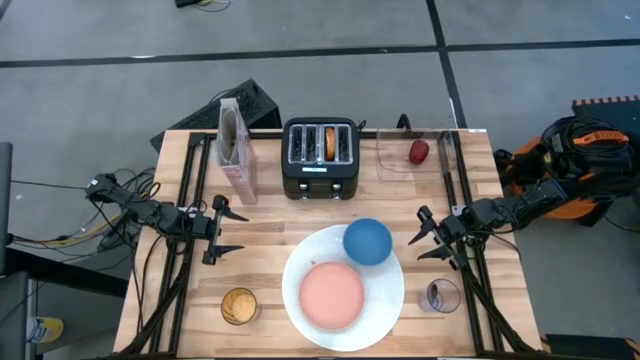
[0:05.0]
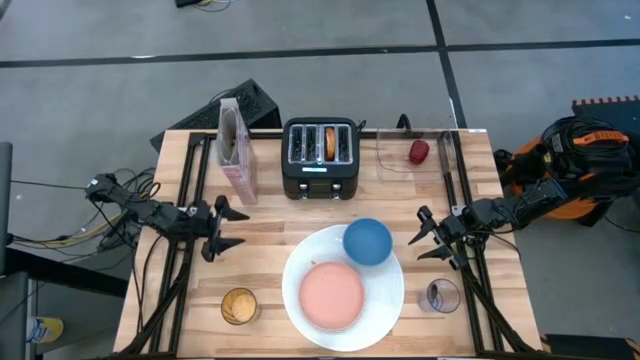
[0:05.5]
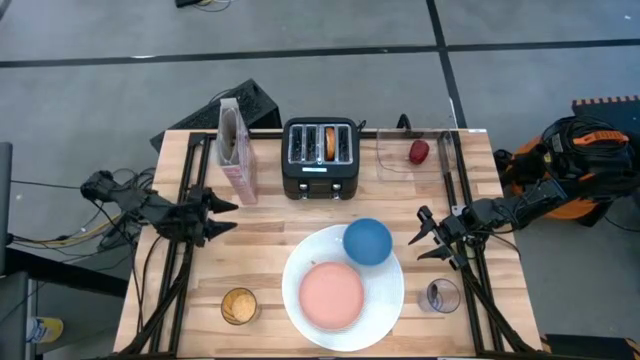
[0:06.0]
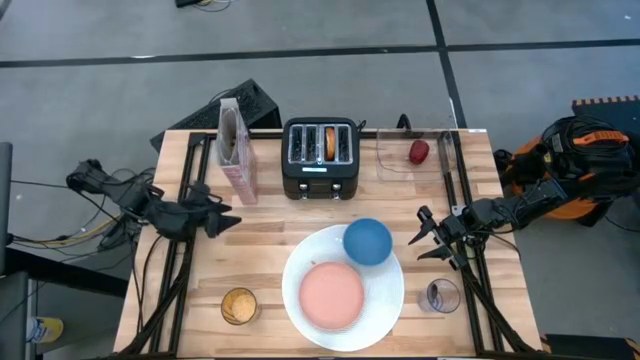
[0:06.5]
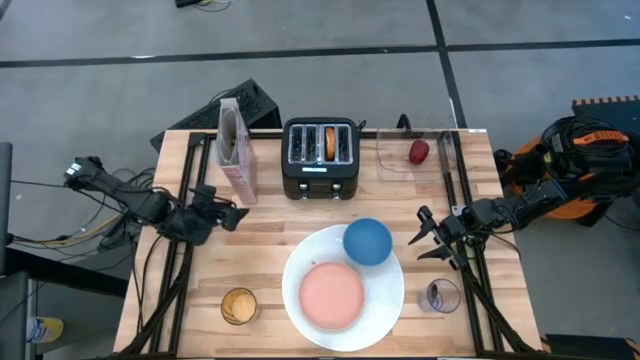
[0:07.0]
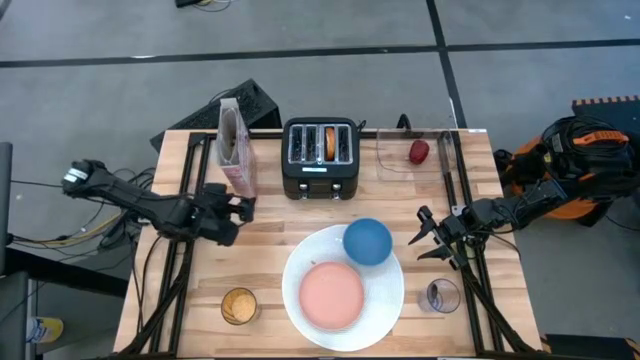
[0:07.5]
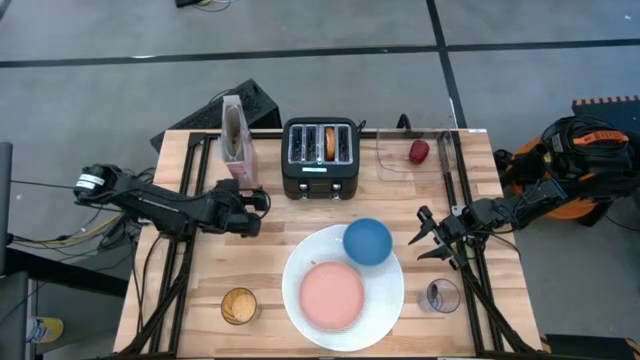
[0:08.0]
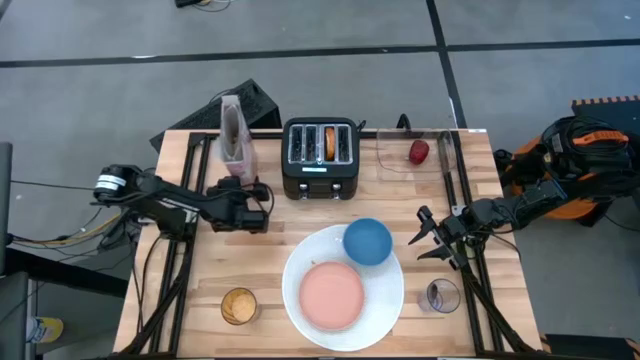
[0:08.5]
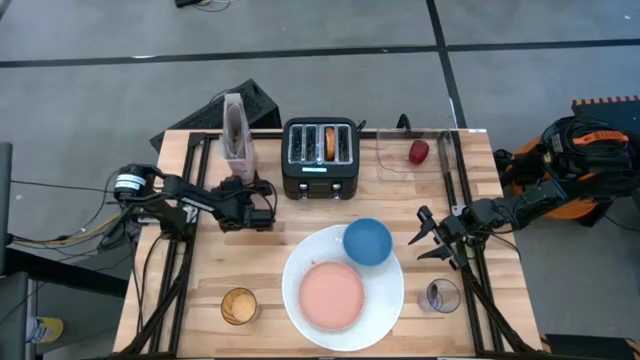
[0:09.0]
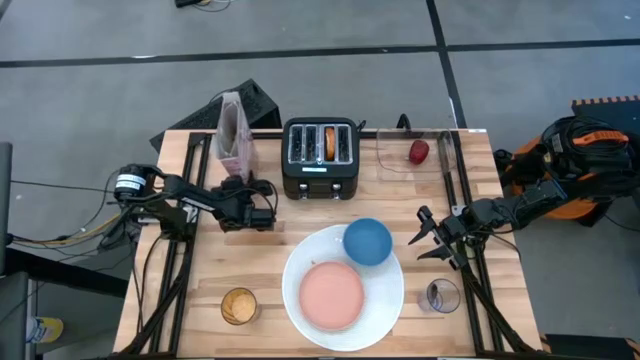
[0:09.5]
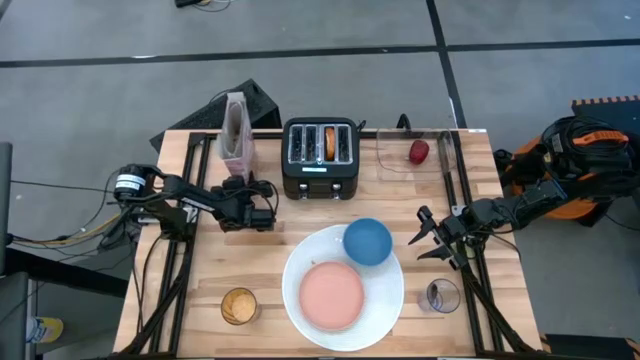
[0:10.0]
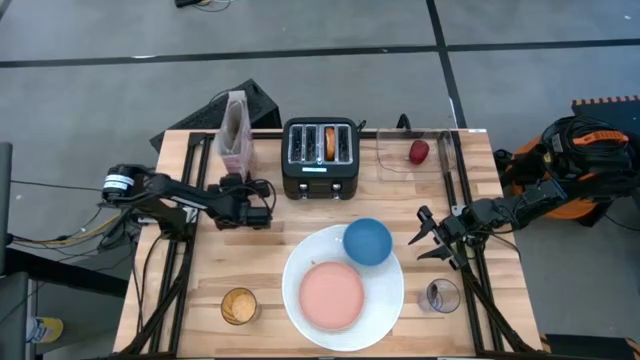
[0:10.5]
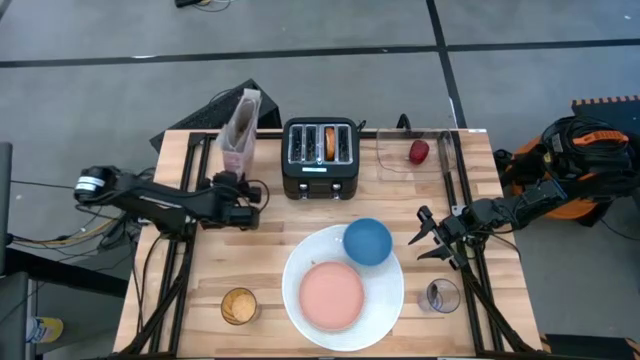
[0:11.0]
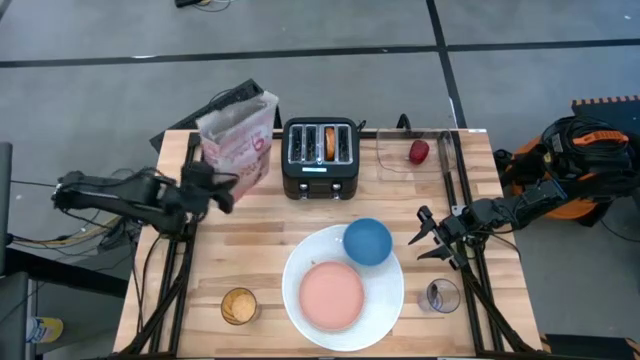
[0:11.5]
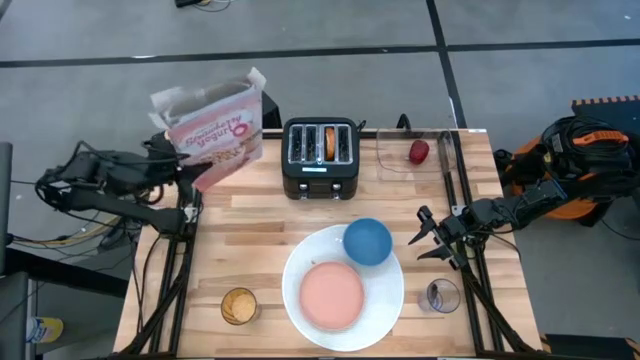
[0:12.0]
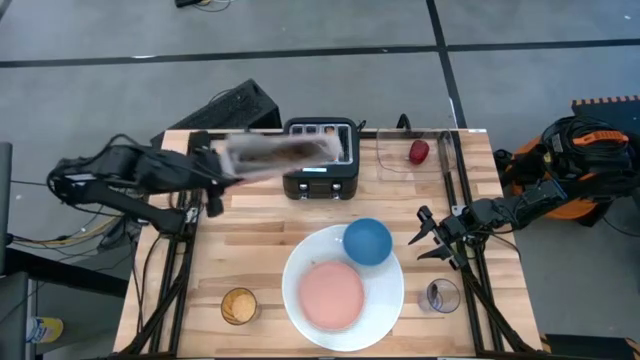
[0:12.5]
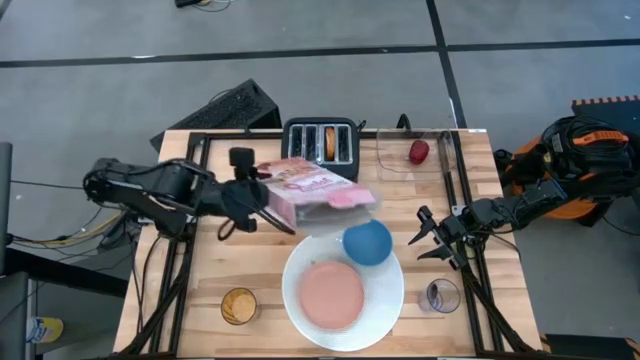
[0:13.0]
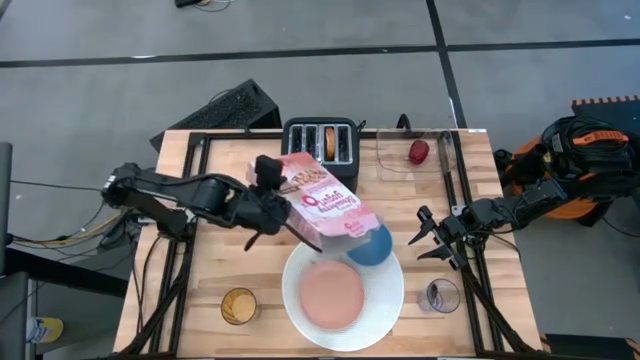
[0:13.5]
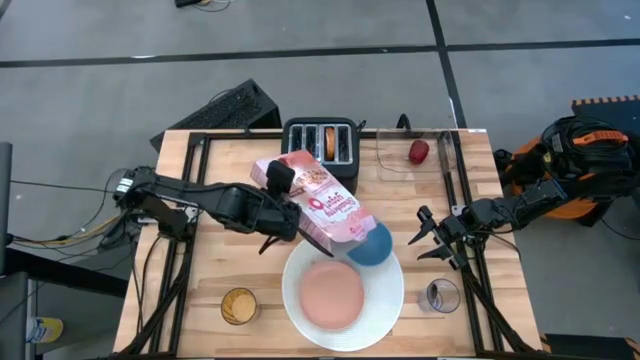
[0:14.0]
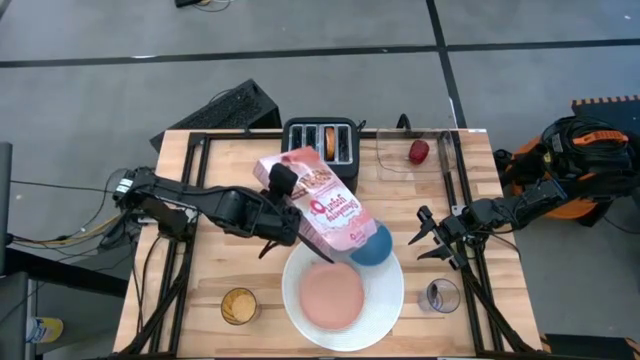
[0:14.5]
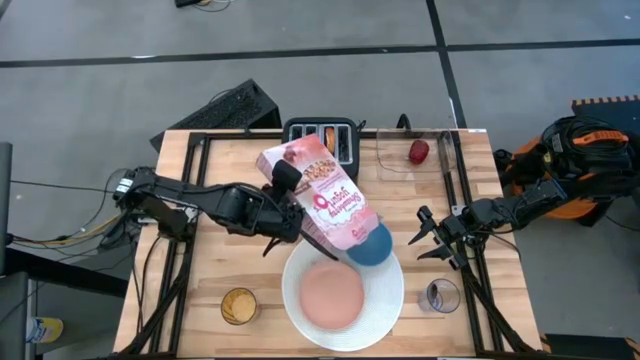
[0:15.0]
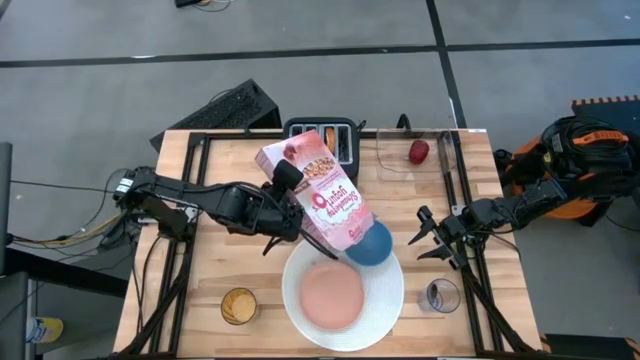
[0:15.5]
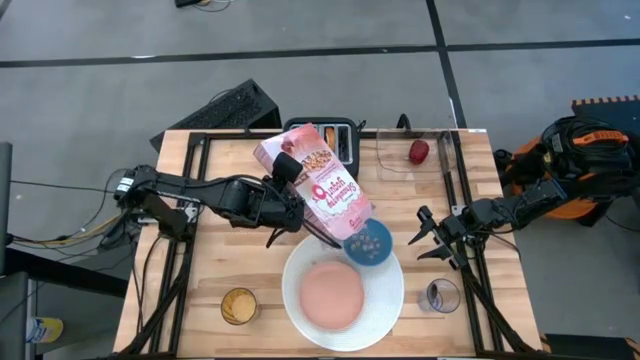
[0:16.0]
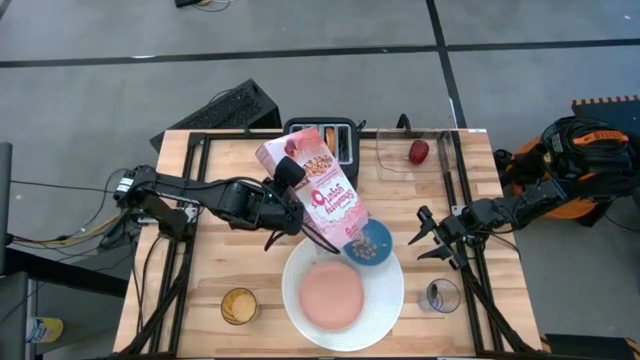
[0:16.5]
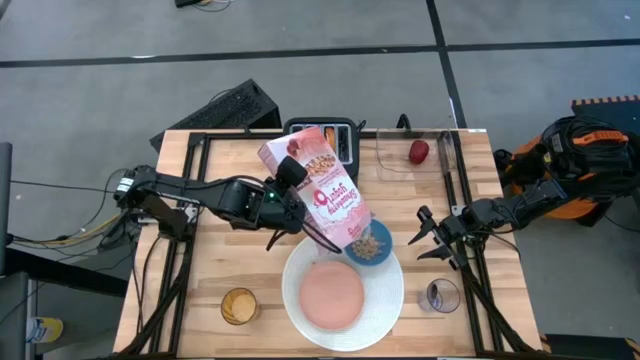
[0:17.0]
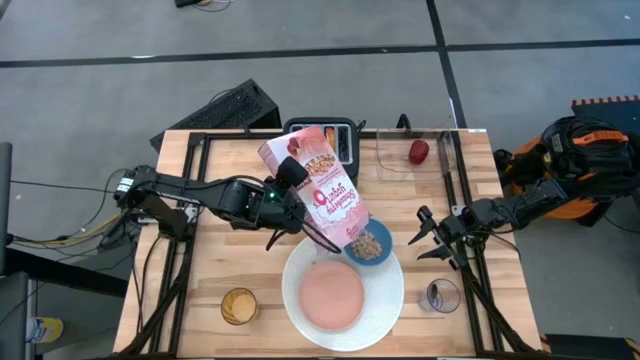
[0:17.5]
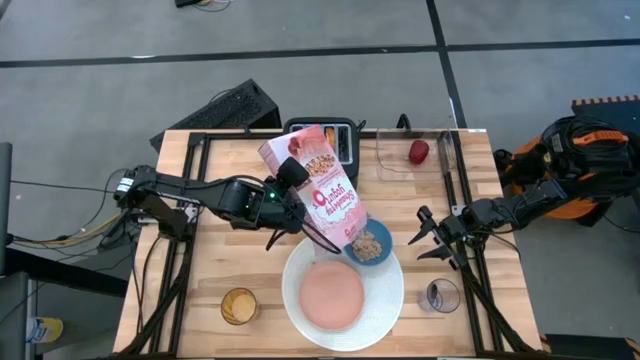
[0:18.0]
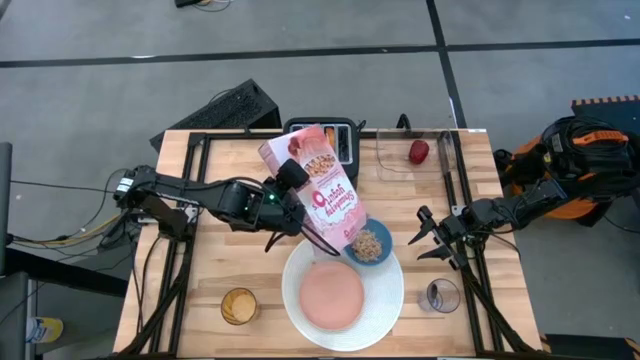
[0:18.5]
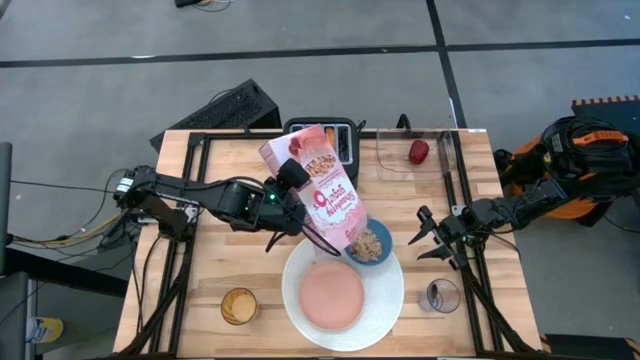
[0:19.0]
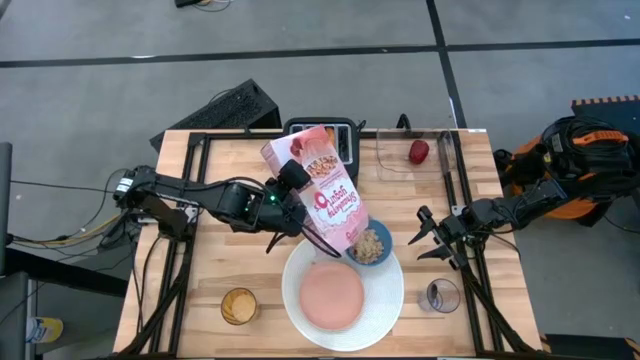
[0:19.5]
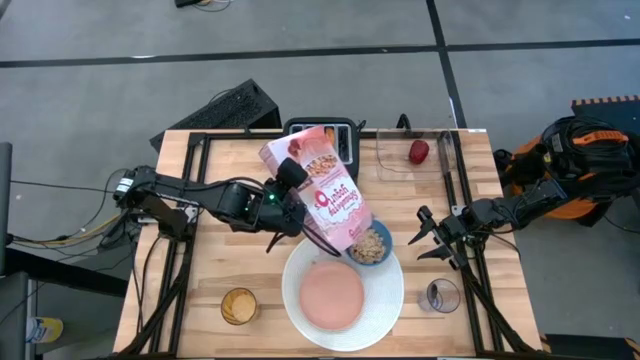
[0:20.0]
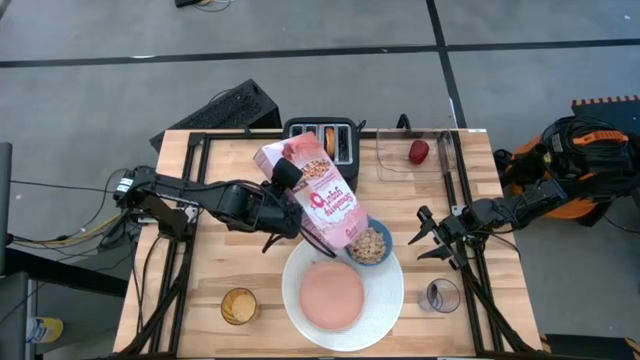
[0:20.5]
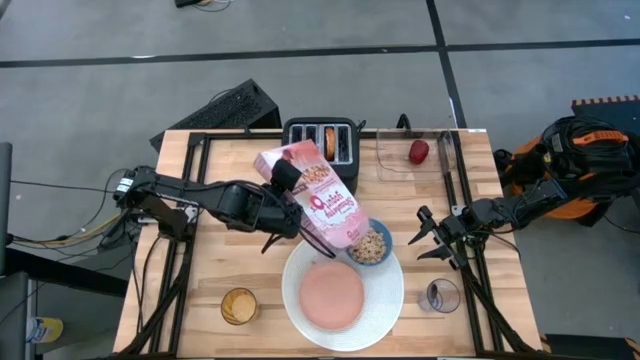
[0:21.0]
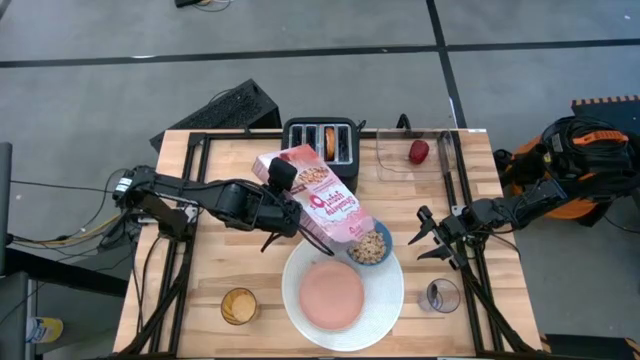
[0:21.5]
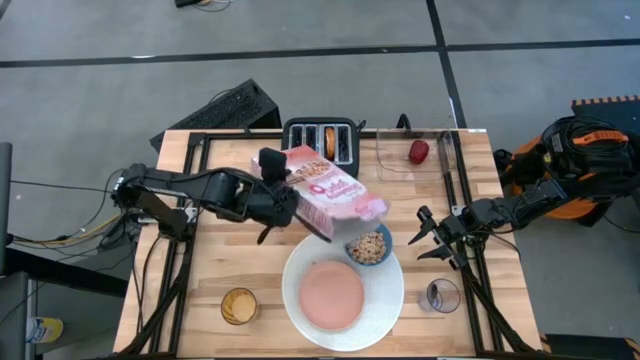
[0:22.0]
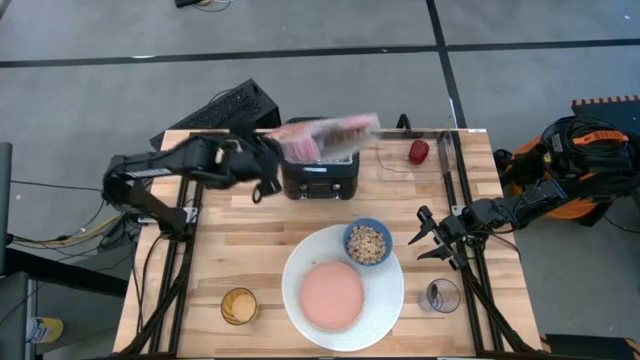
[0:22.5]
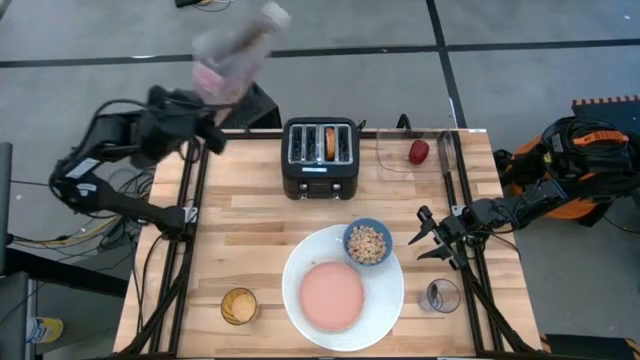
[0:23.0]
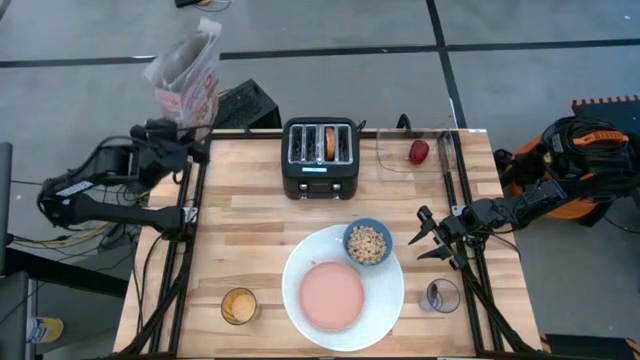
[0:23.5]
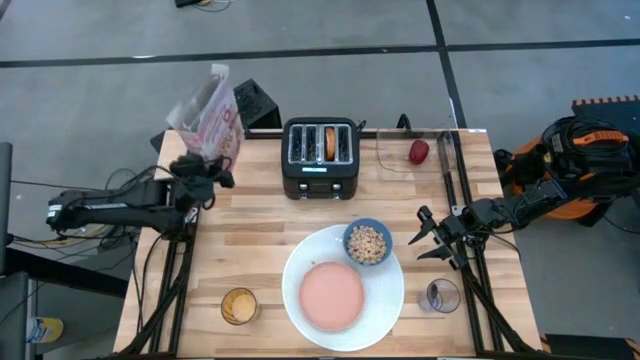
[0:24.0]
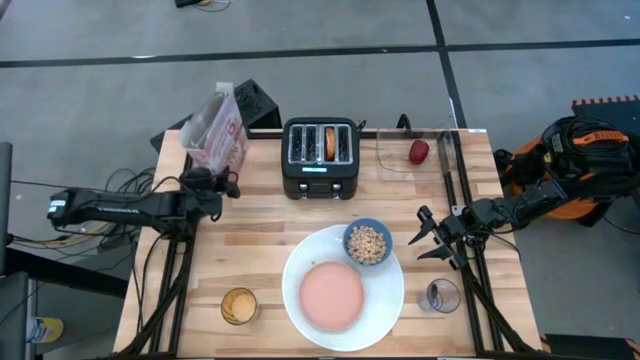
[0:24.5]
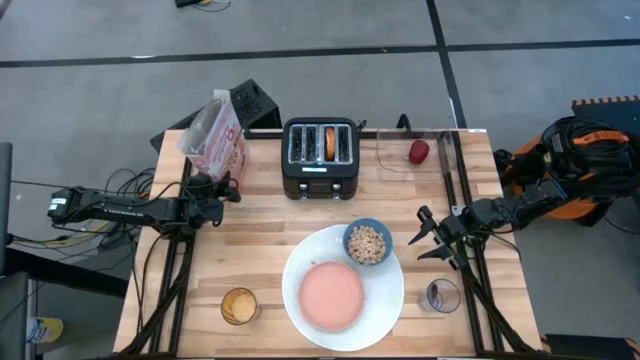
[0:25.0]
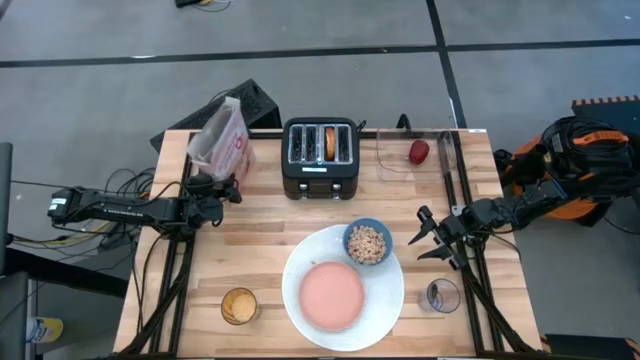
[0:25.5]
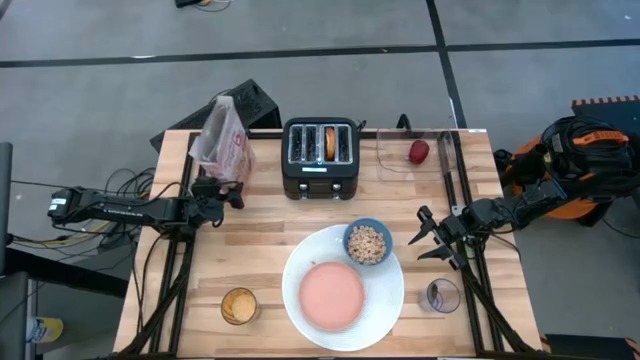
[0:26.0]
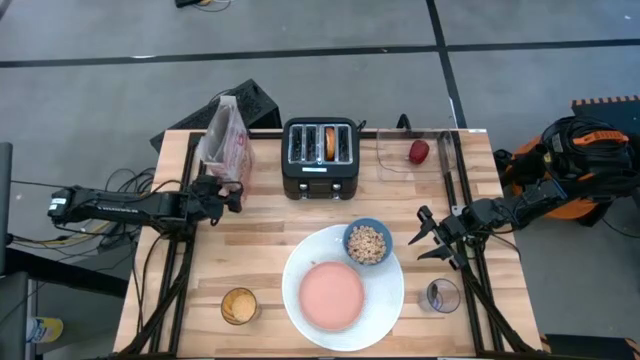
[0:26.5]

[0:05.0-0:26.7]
Task: Arrange a breakfast setting
Pour the cereals into the blue bowl
